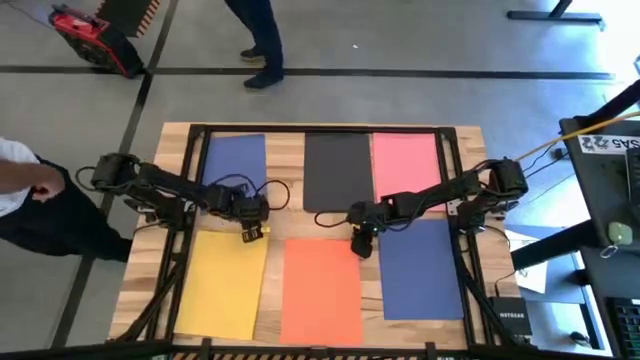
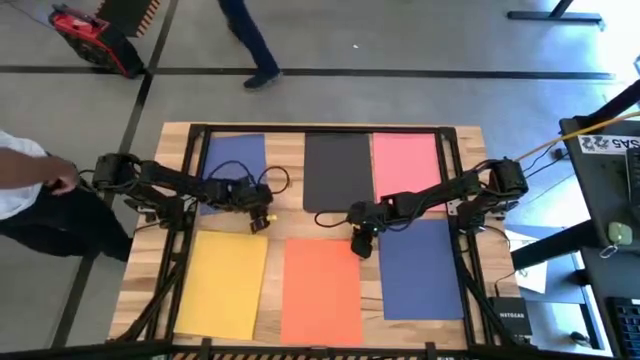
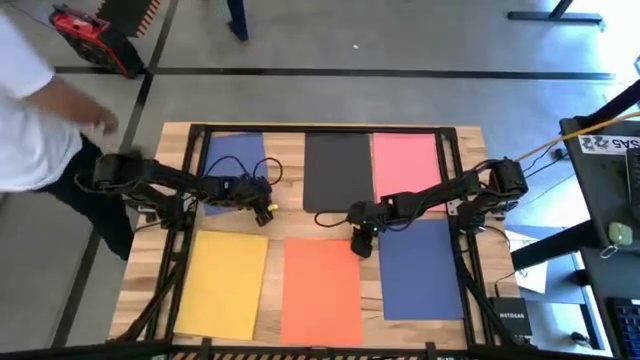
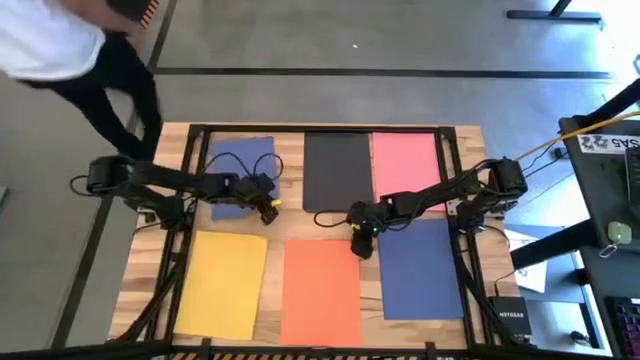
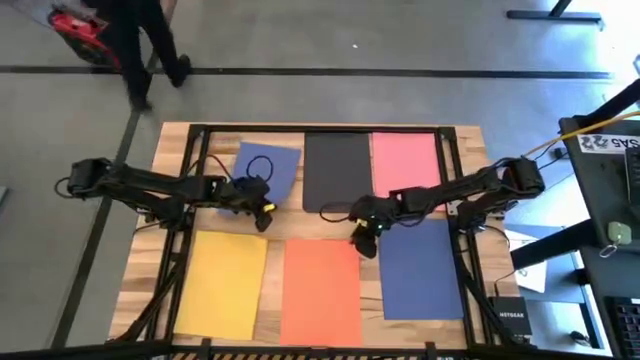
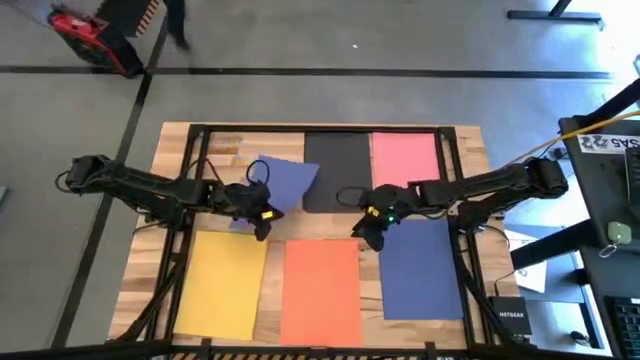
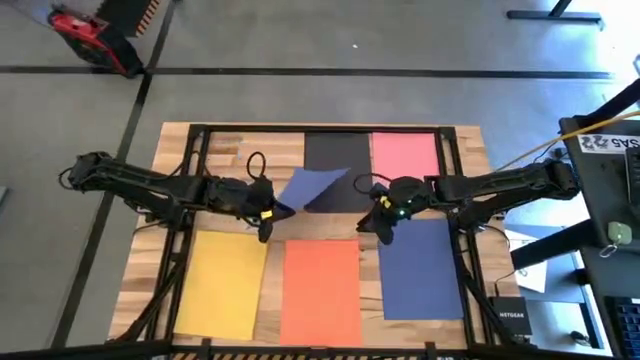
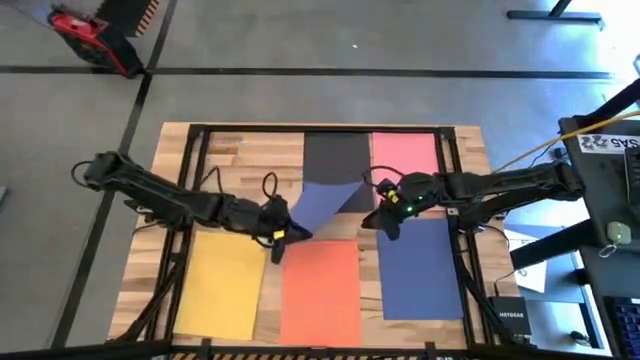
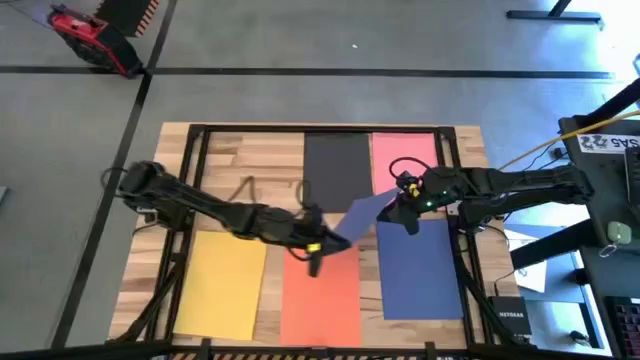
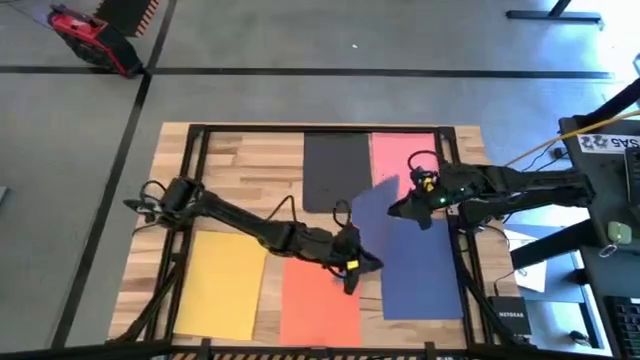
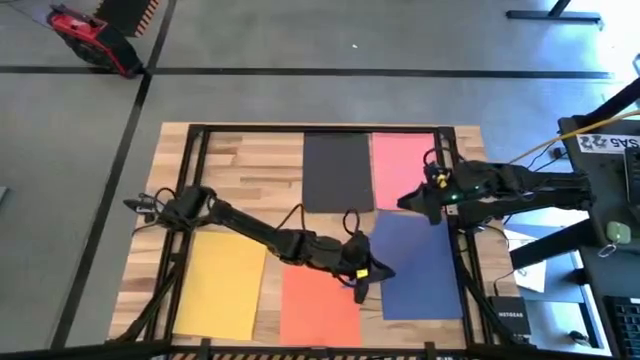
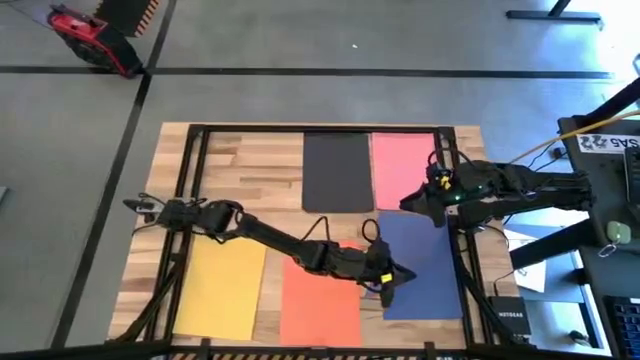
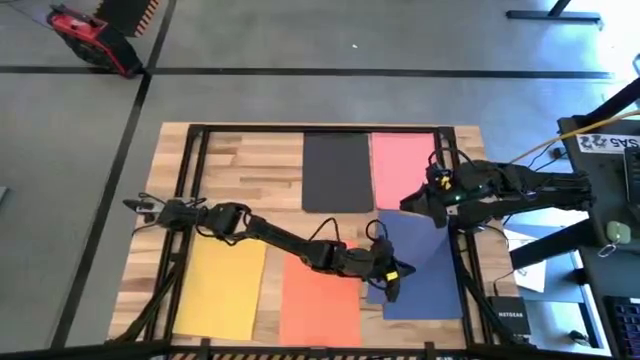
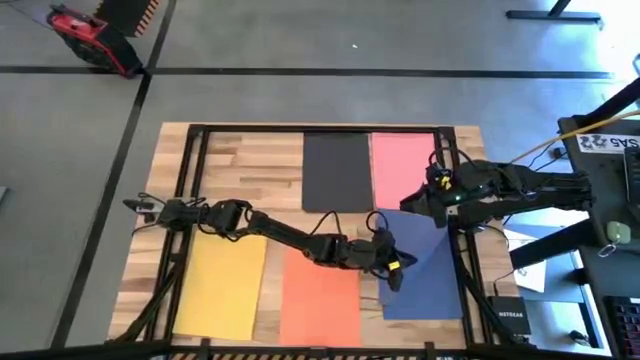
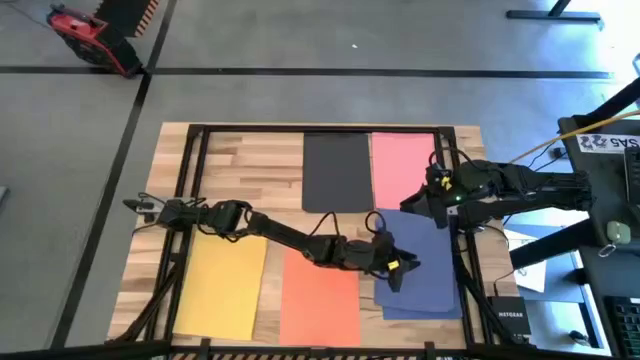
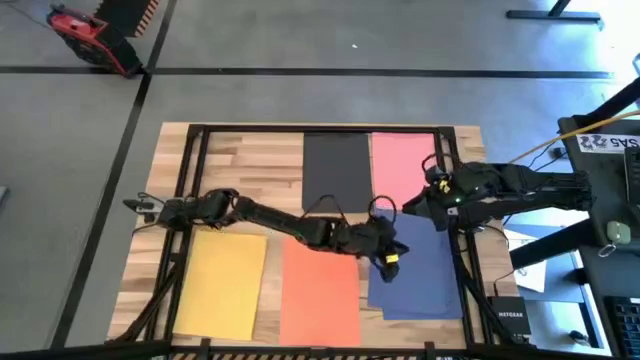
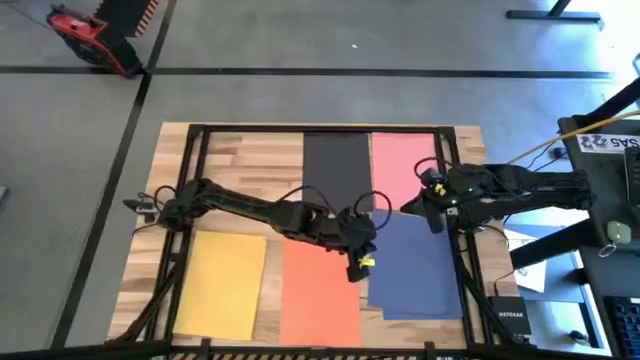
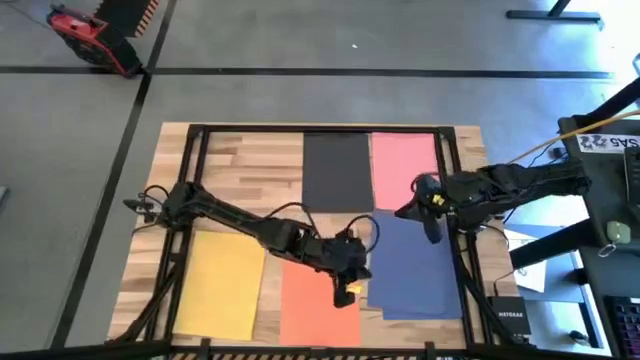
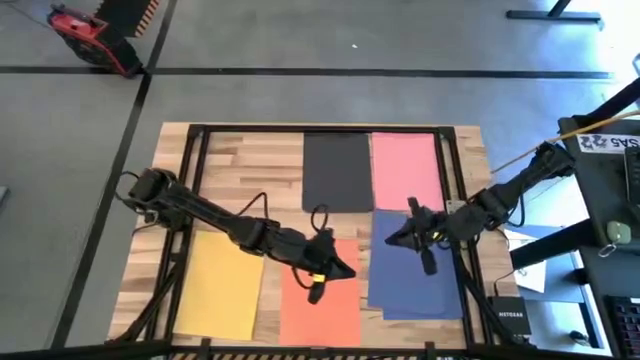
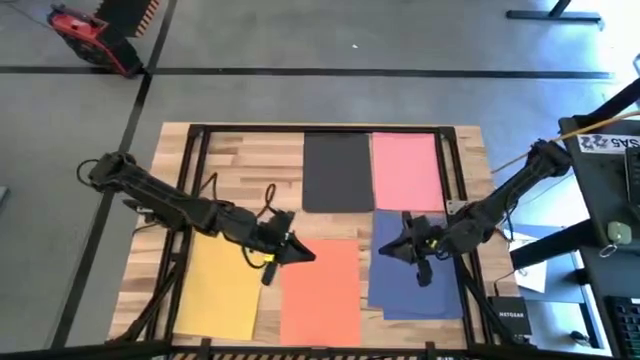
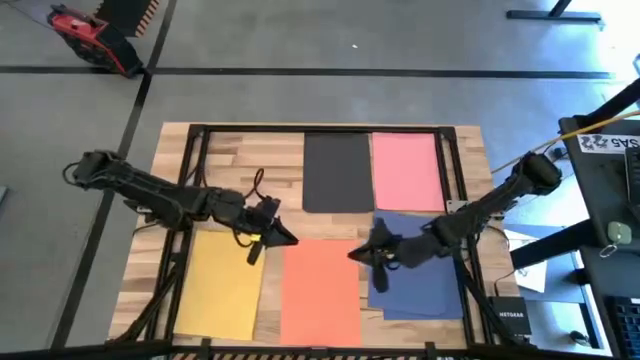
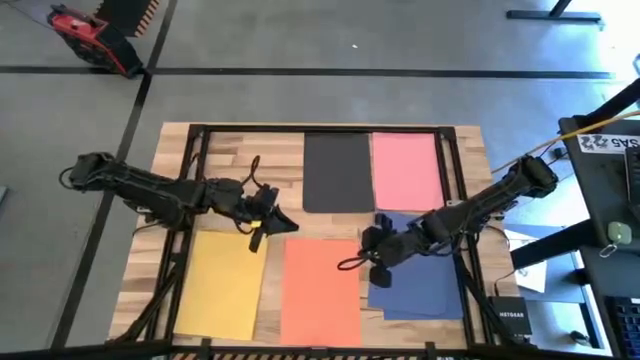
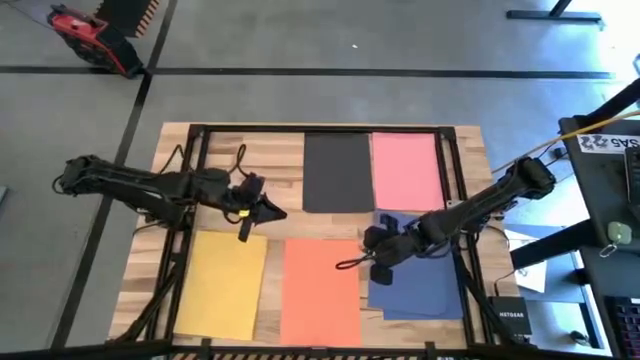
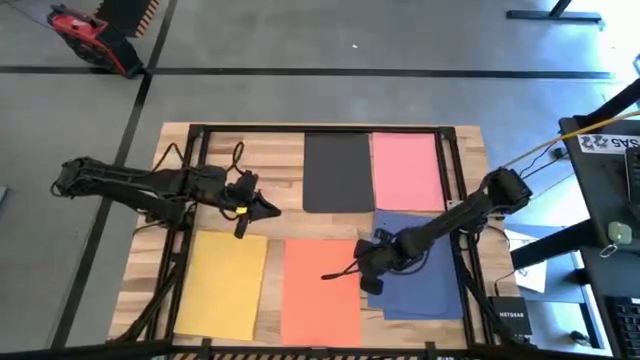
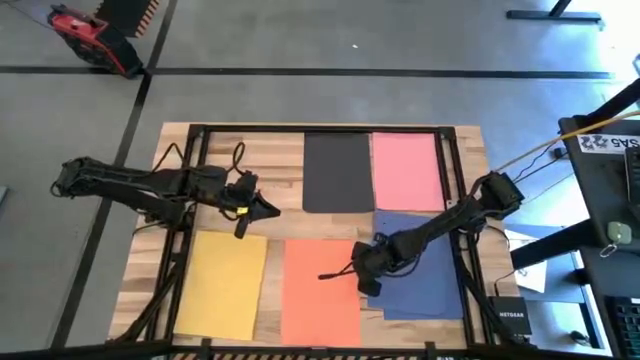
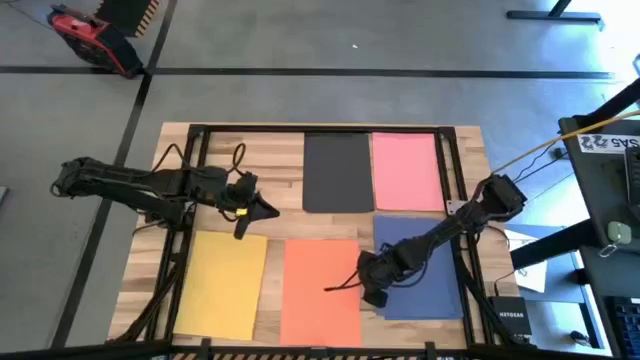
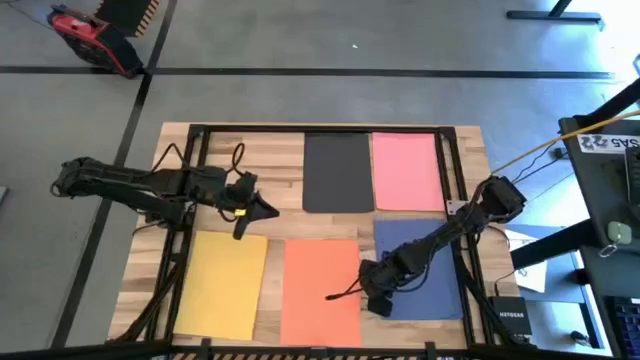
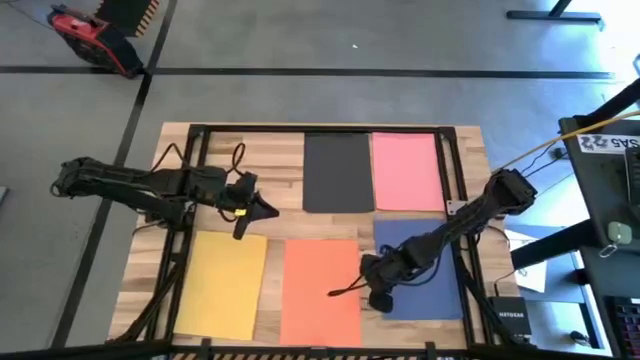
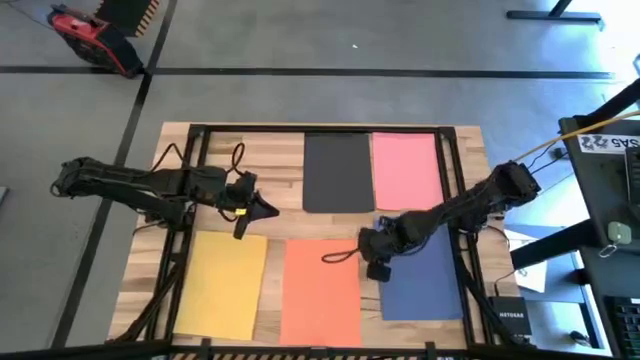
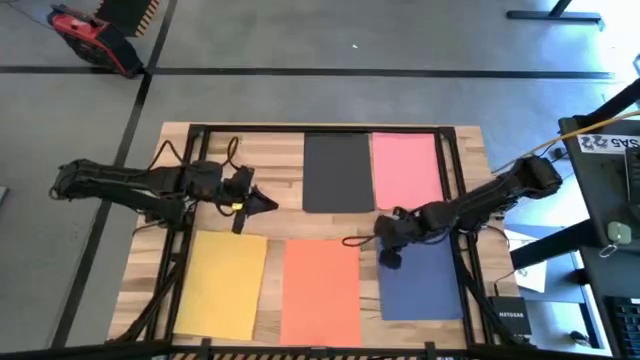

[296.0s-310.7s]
Task: Organize paper
Stack the blue paper on top of the stacked blue papers

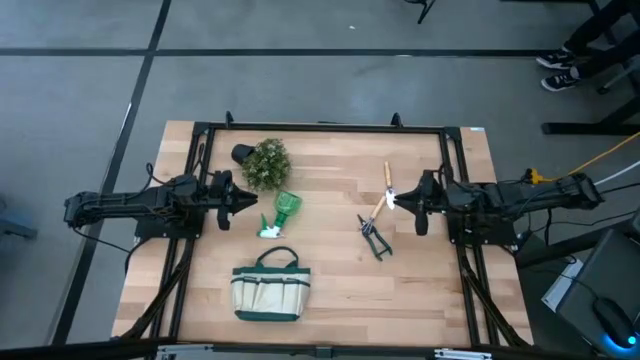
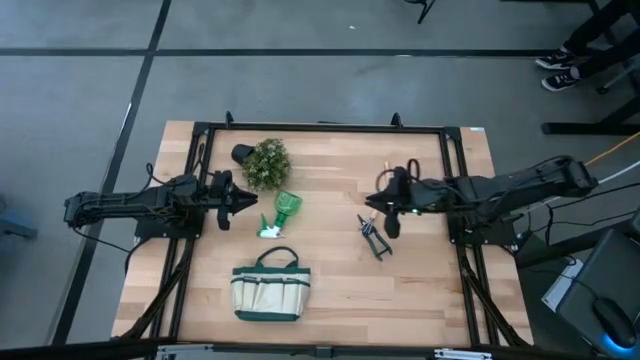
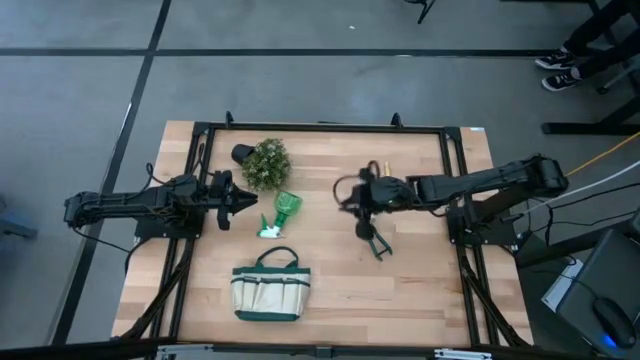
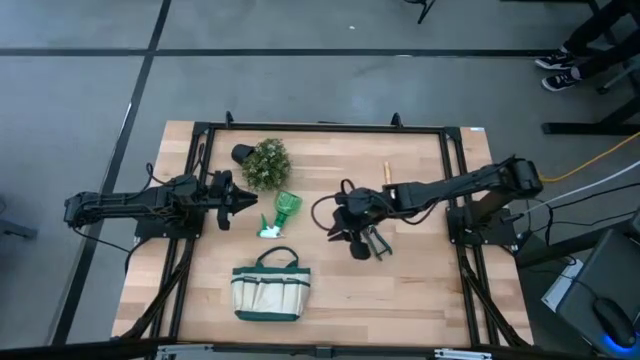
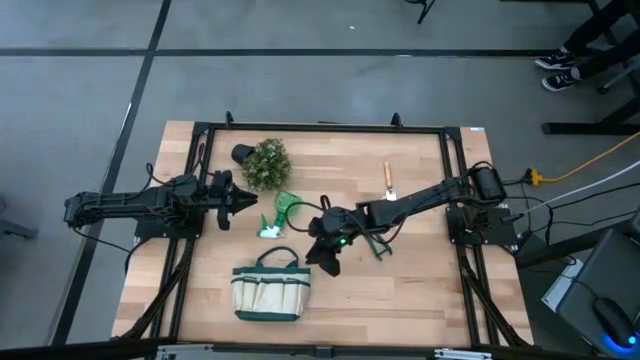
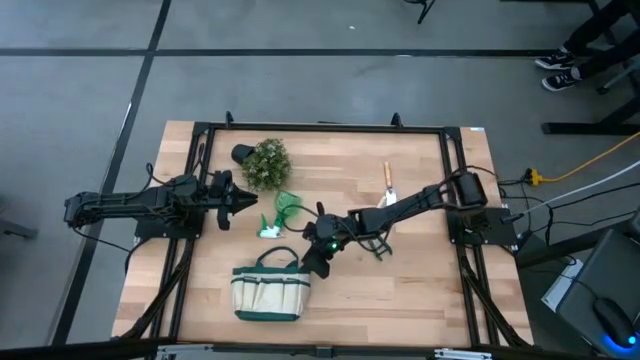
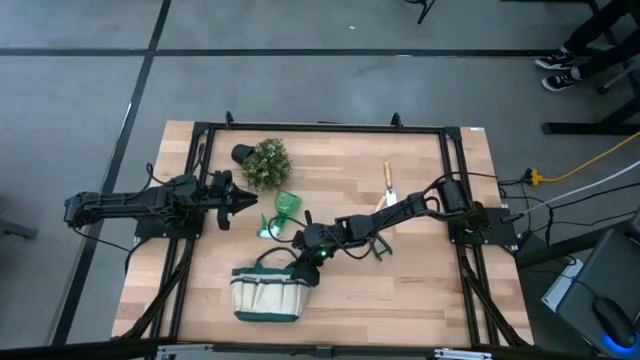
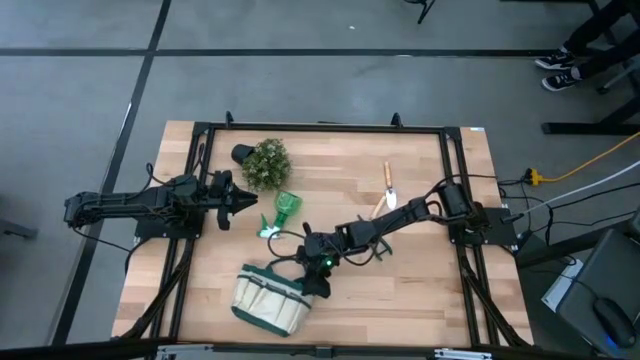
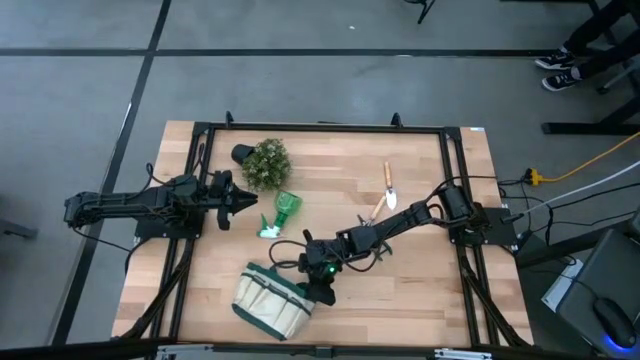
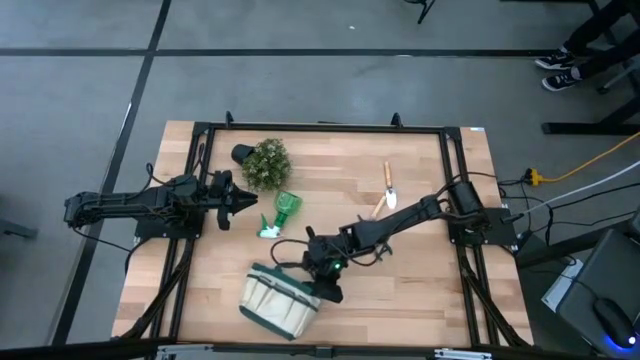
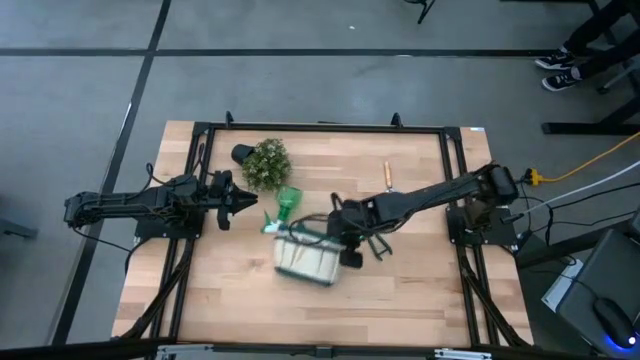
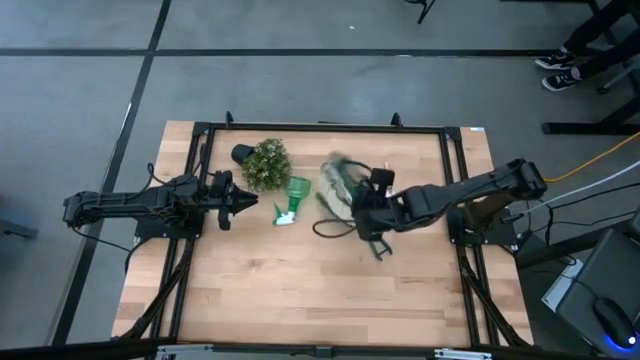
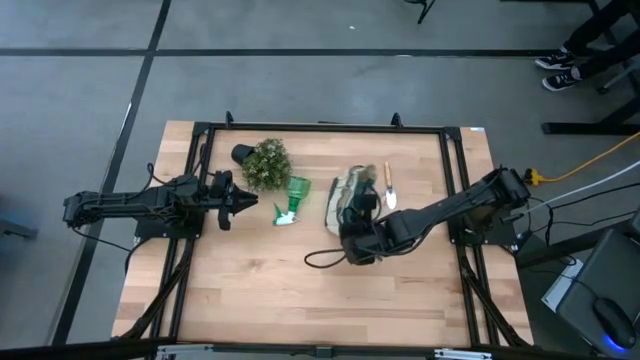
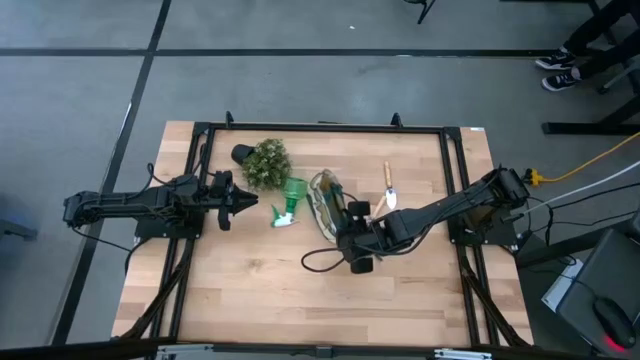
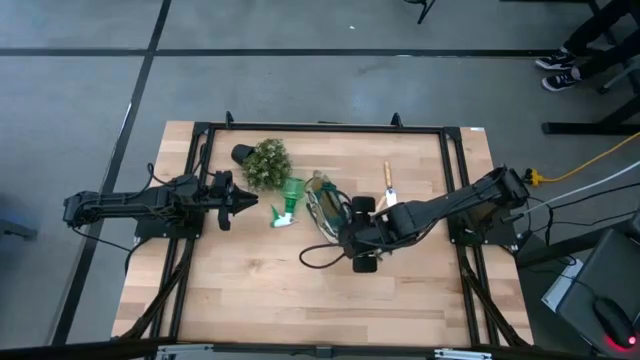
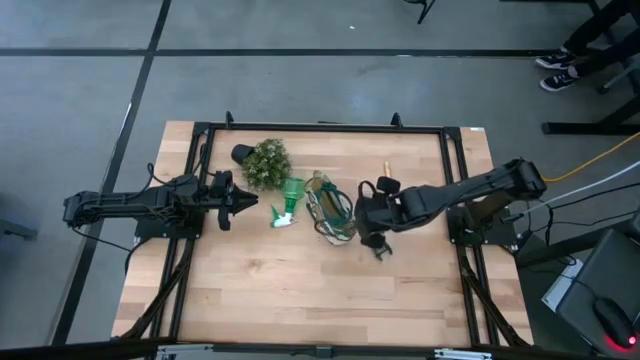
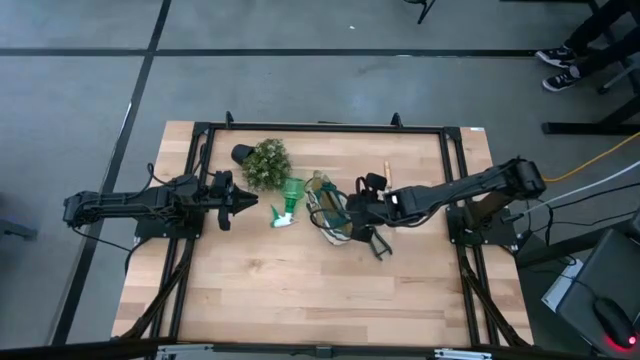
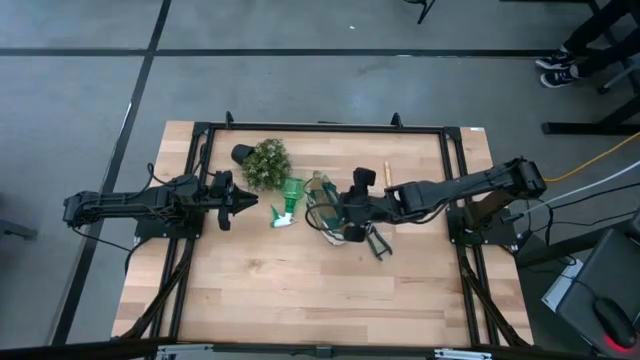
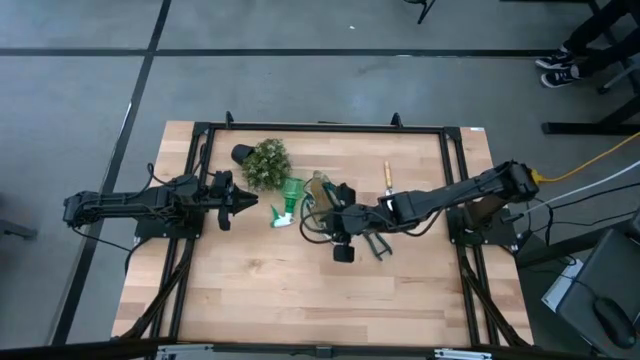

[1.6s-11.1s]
Task: Pick & Place Garden tools in Gardening bag
Move the light brown gardening bag to the center of the table
